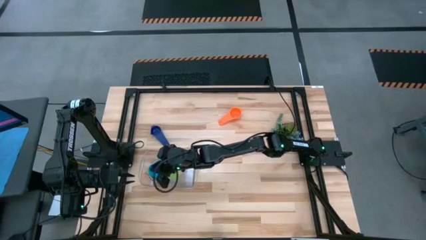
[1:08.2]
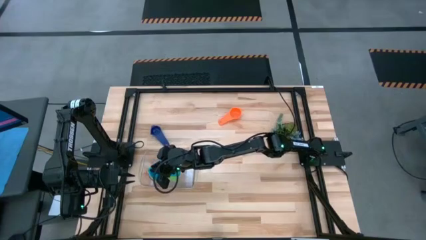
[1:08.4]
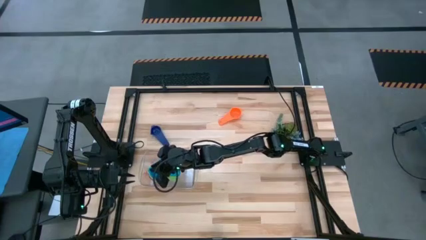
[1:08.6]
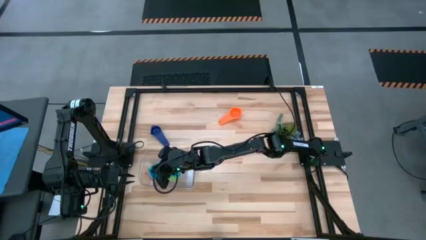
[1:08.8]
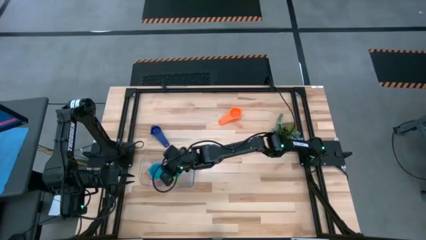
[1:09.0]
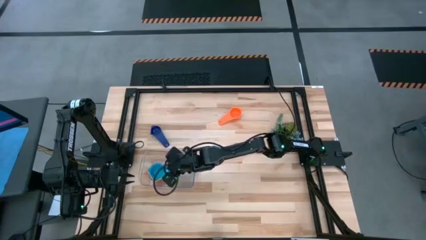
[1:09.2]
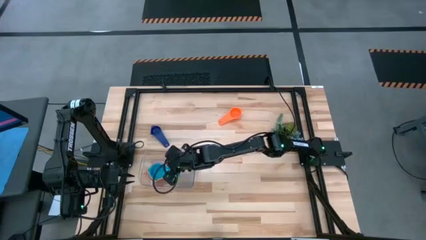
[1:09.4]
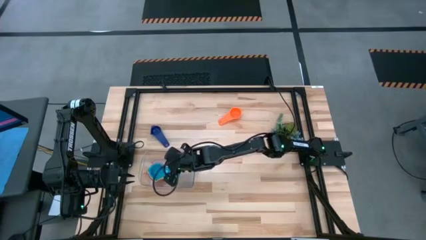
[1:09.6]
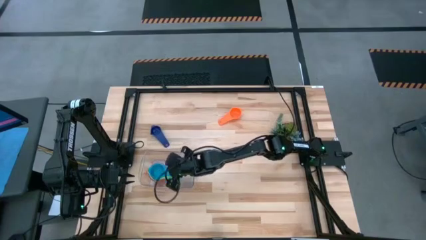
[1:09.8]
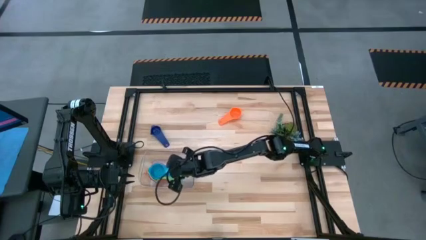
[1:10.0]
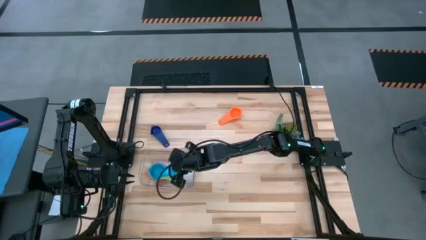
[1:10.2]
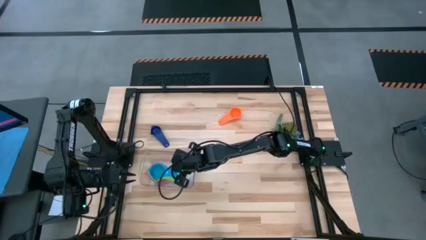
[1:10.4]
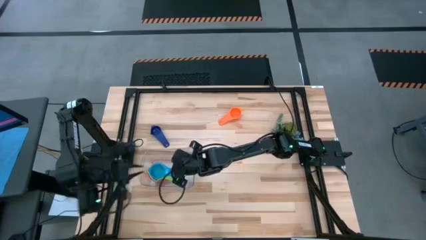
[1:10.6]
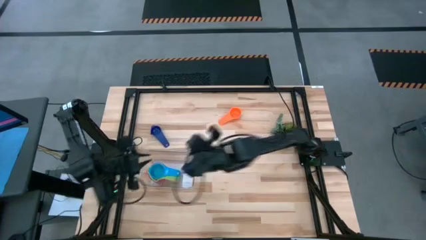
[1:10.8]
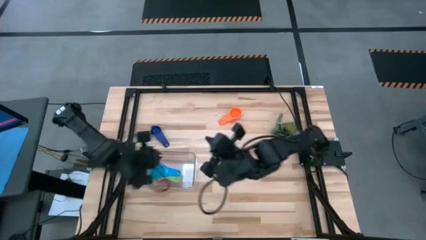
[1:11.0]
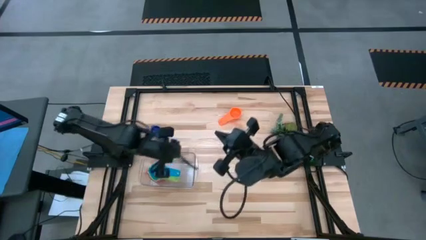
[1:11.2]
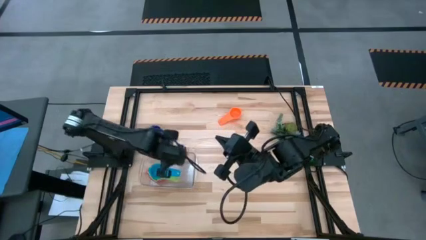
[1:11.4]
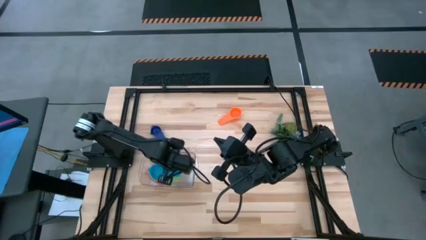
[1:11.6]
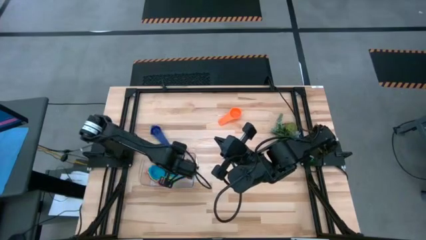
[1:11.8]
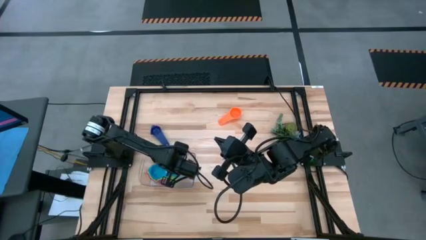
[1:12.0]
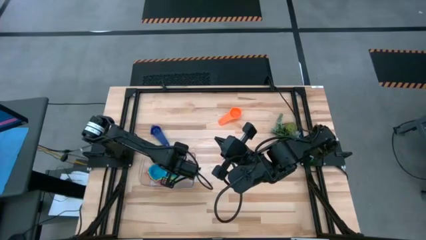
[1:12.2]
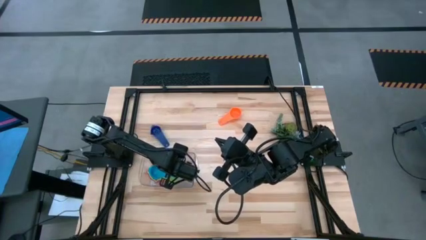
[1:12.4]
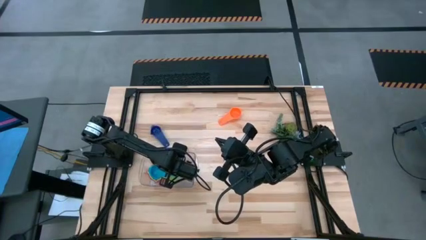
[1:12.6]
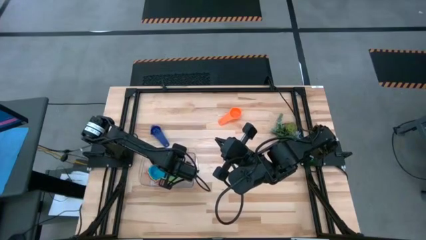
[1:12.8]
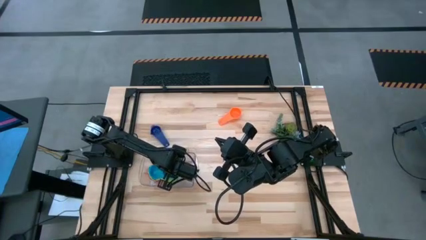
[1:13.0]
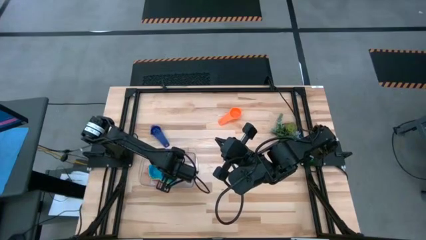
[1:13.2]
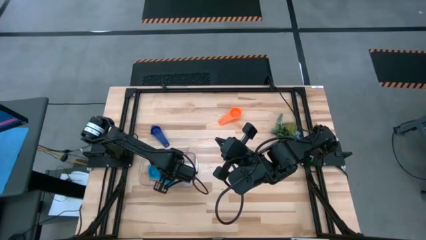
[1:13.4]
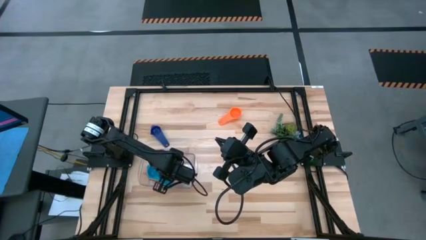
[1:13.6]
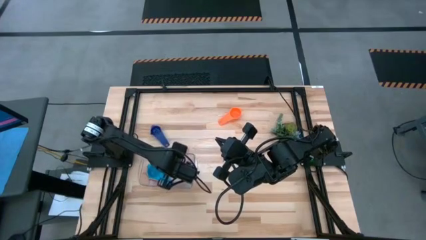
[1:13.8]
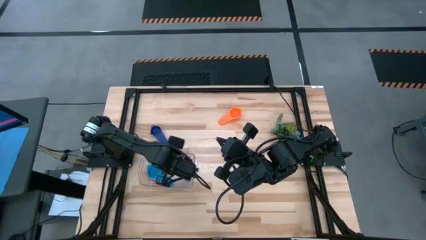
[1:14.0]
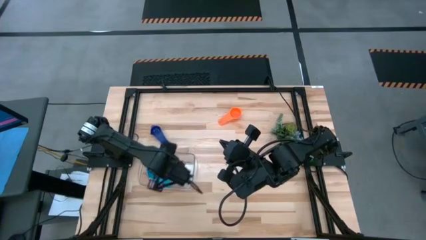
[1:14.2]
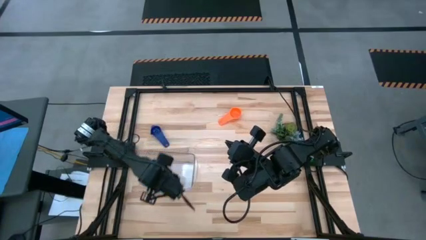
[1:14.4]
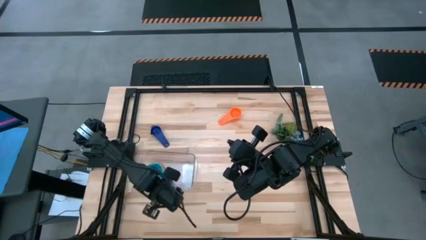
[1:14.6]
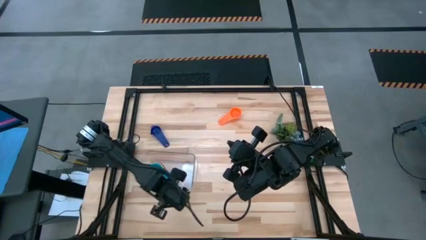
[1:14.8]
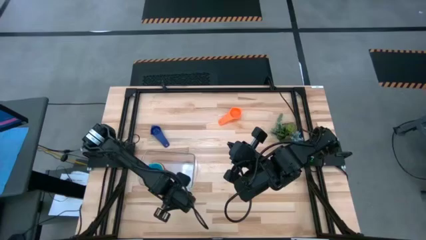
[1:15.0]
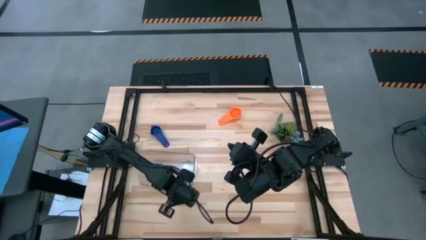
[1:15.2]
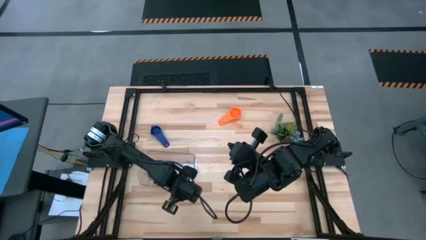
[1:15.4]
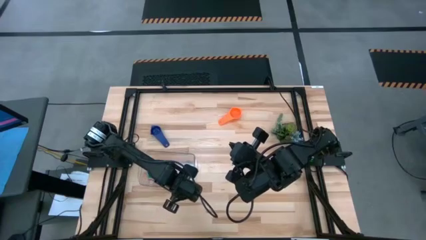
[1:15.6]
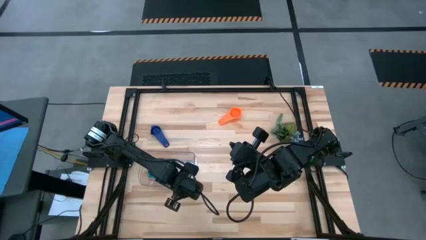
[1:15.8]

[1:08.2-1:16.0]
Task: Nest measuring cups in basket
Adjust the measuring cups and the transparent bin

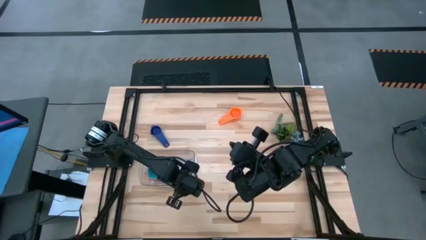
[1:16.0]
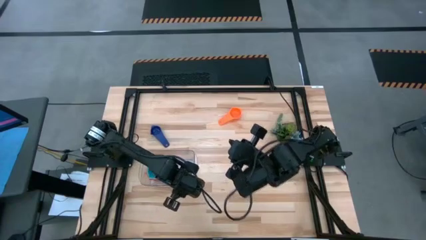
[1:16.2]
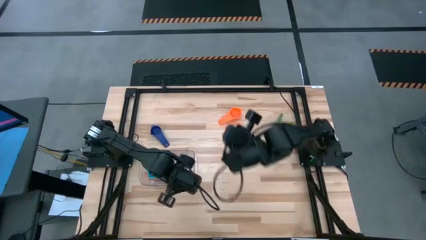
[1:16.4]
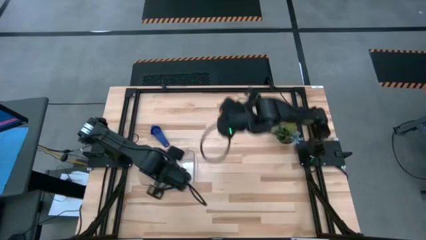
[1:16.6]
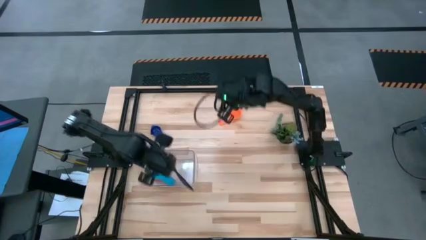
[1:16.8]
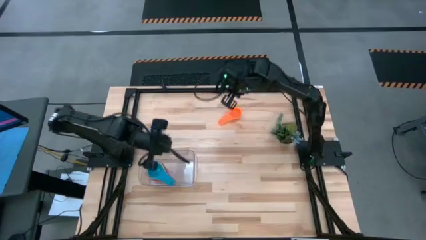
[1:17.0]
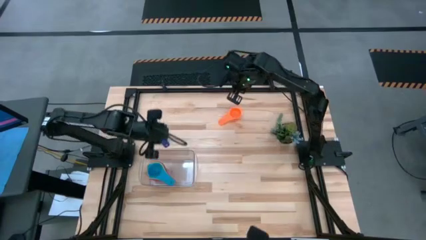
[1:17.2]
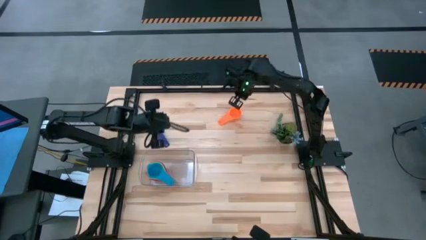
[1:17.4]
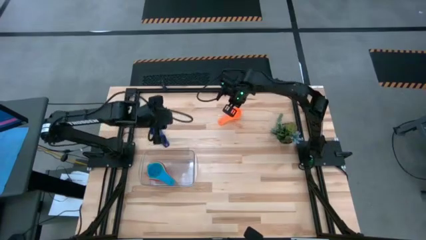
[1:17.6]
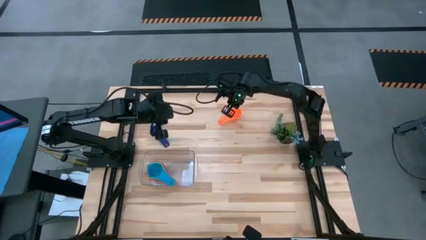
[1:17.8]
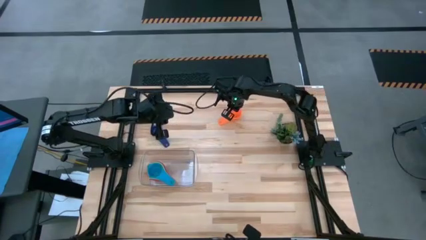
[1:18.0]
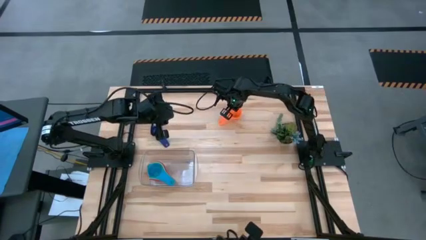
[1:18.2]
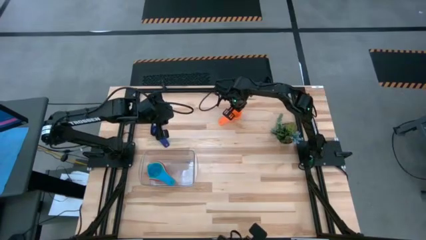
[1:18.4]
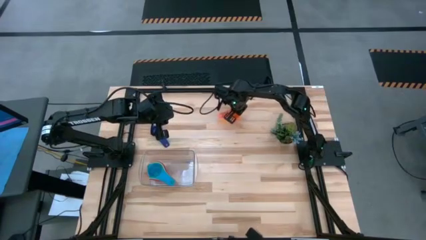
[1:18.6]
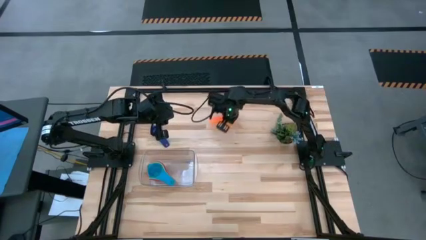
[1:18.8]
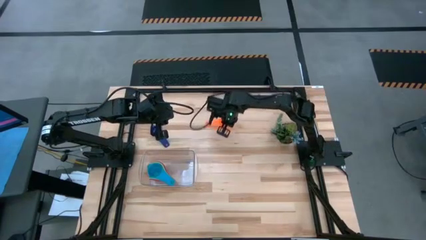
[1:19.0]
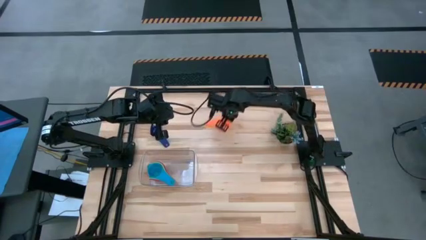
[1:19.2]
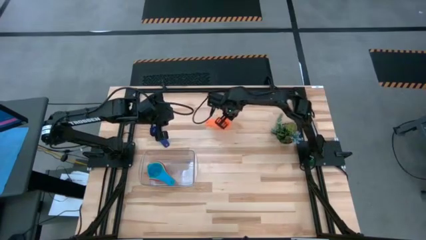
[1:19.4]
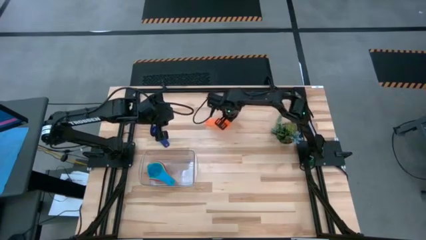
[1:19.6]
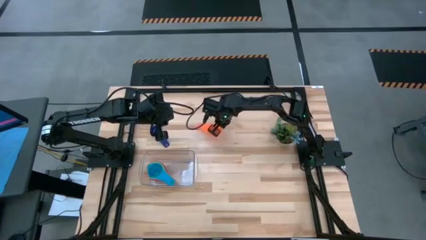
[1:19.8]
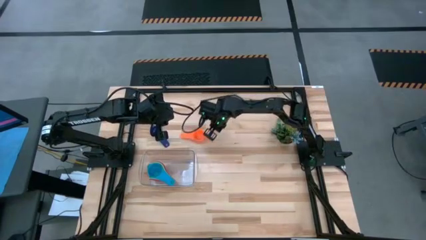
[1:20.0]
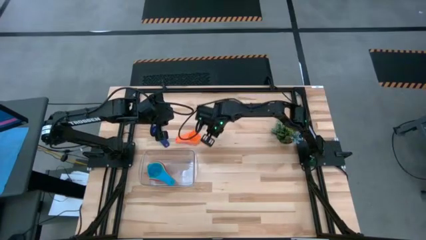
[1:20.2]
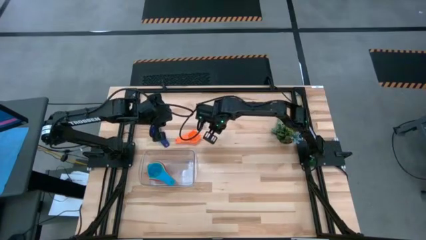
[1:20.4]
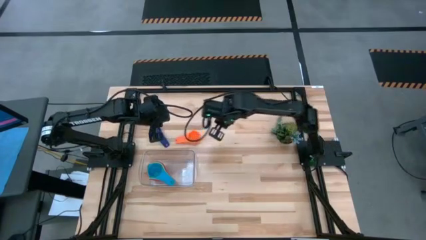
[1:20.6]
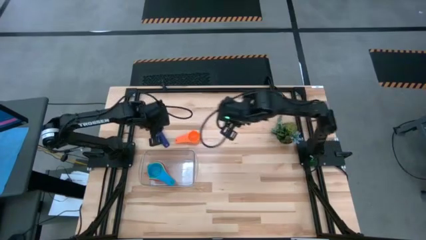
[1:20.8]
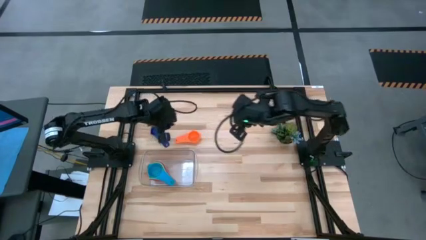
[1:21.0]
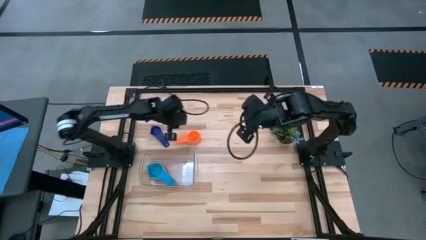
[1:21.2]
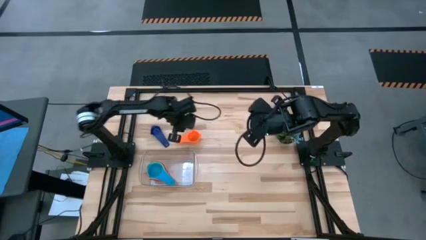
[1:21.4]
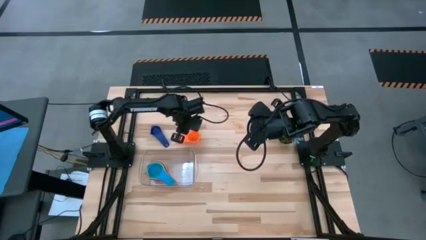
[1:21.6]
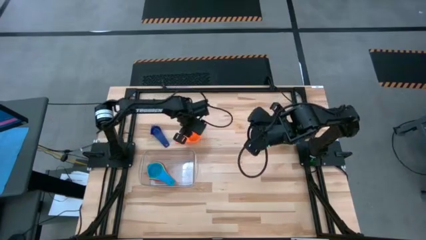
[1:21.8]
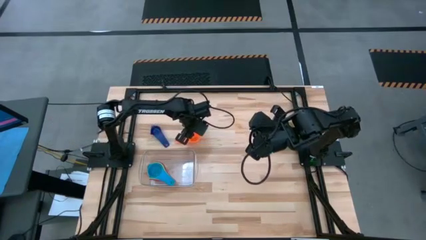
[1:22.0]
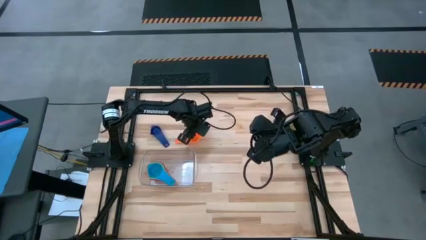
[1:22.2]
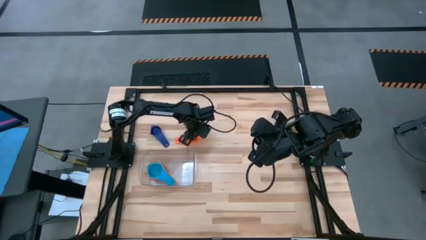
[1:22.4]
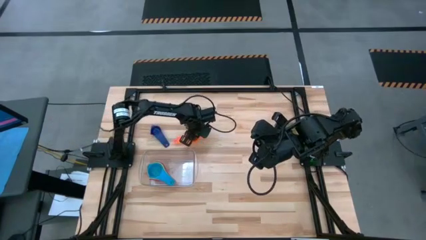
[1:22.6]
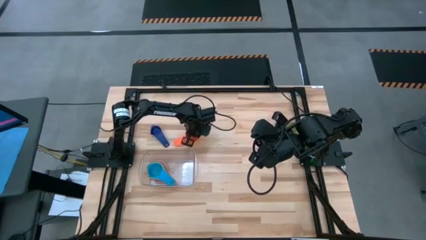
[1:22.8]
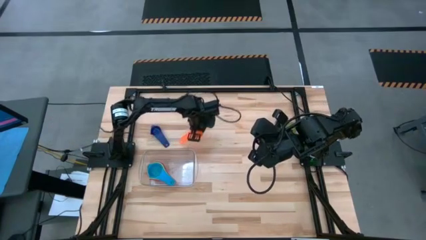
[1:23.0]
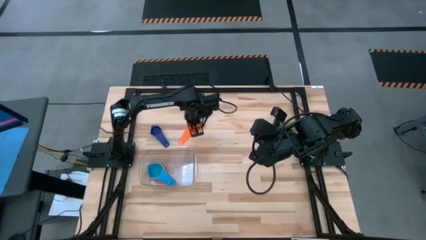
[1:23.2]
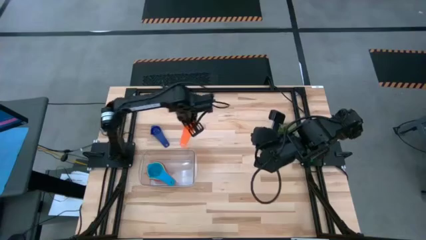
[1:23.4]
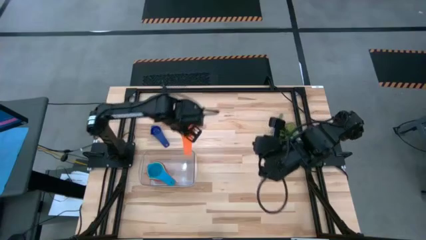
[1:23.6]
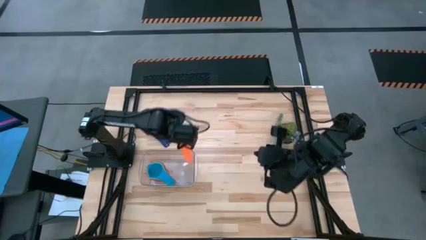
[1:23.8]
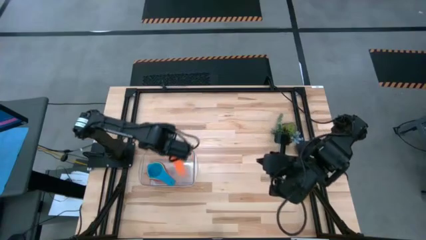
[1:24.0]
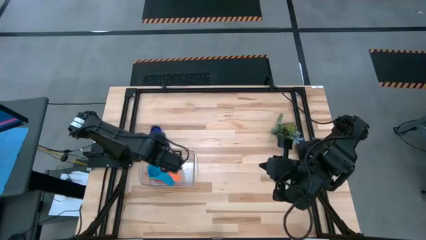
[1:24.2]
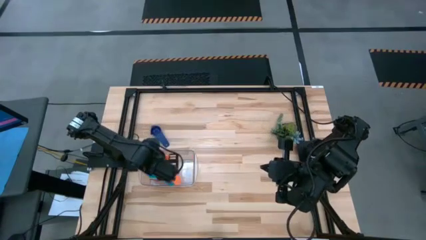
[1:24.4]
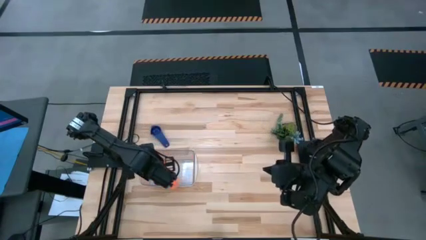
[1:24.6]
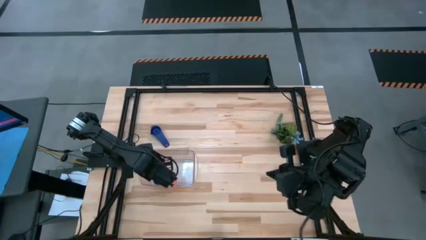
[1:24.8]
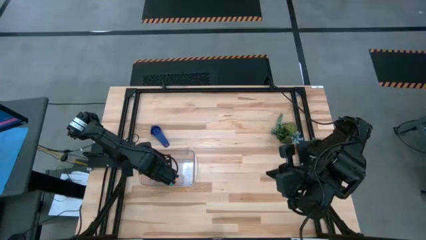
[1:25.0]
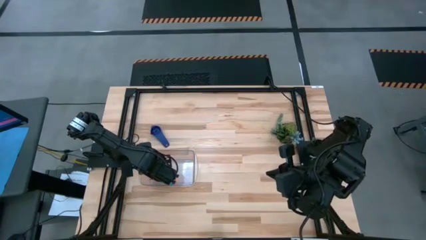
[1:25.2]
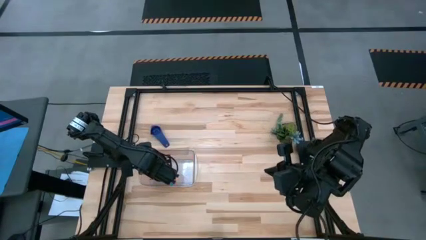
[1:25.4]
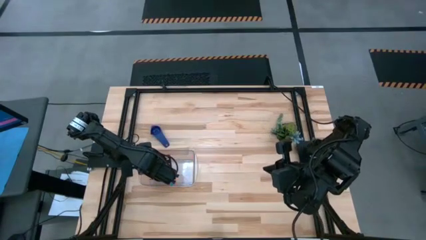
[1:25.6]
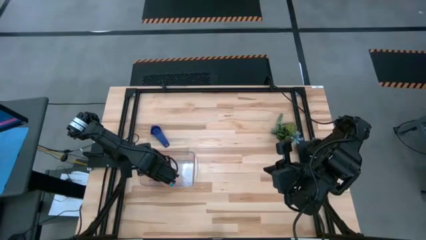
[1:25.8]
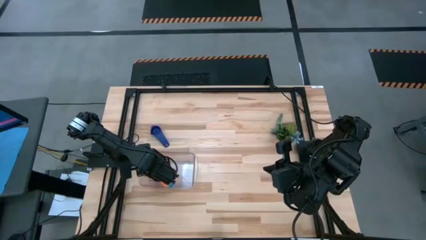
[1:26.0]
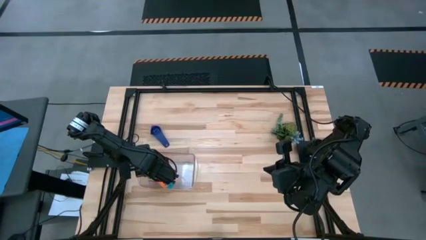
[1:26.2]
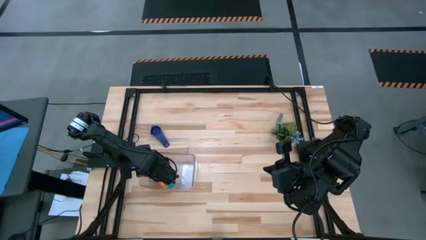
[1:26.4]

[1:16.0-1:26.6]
Stack the orange measuring cup on the light blue measuring cup in the transparent bin
